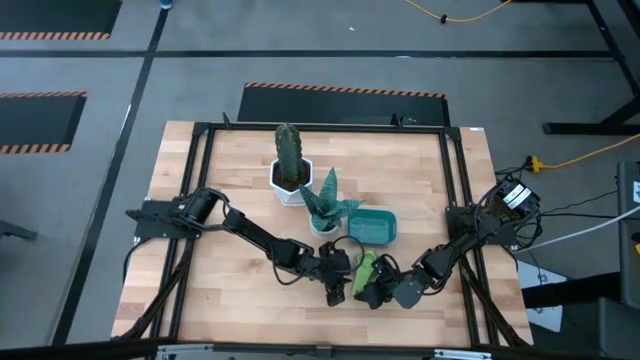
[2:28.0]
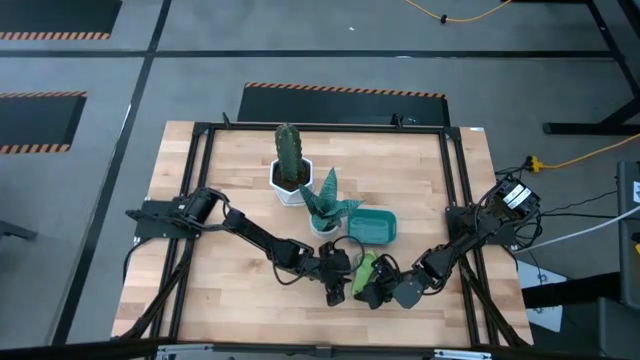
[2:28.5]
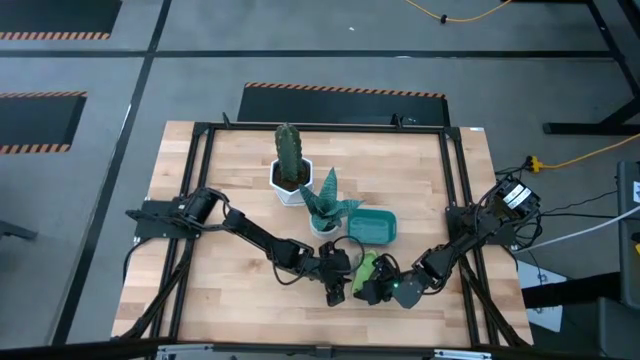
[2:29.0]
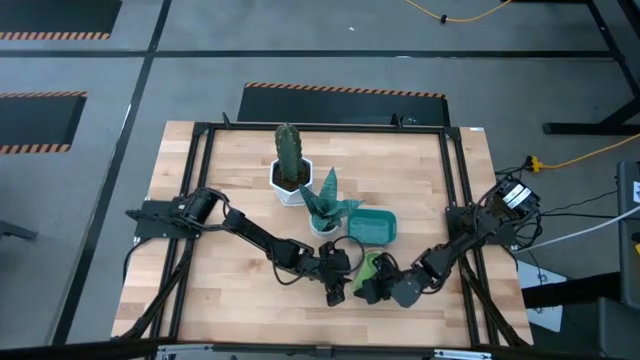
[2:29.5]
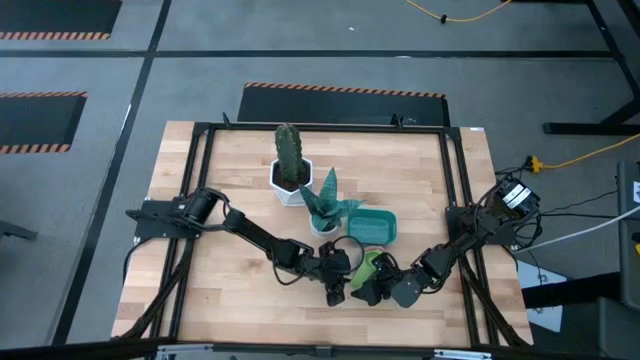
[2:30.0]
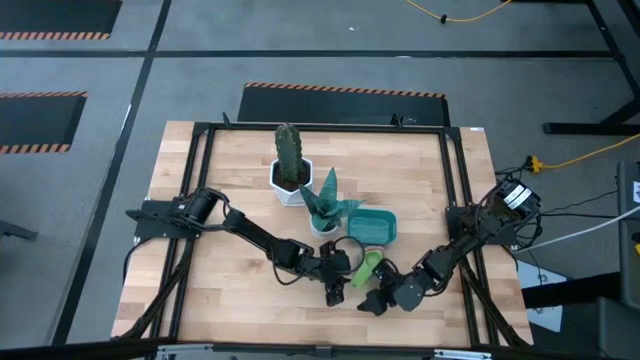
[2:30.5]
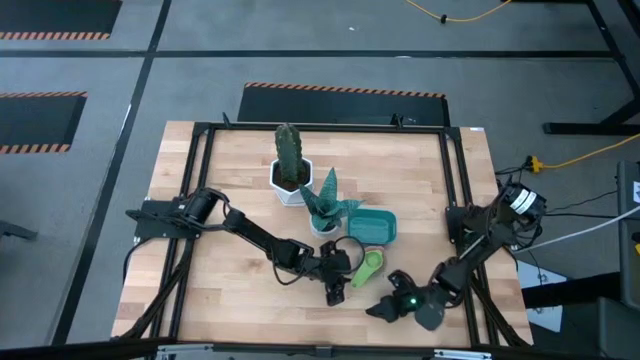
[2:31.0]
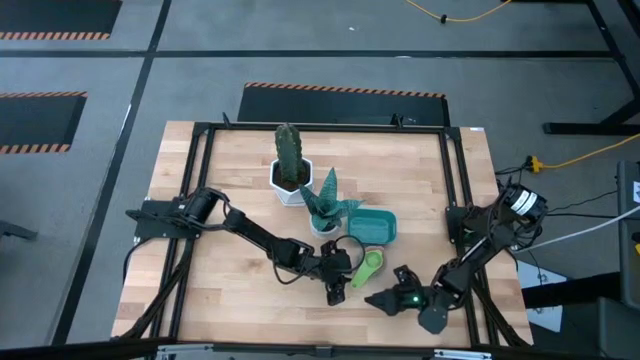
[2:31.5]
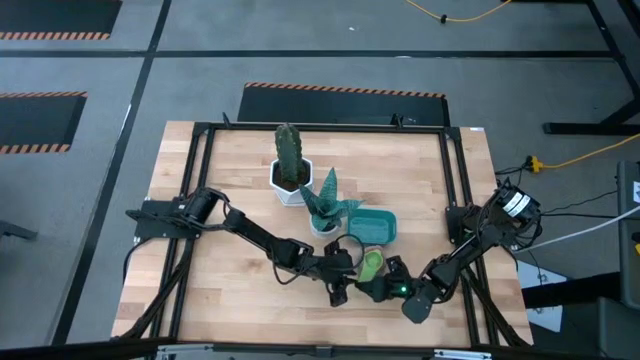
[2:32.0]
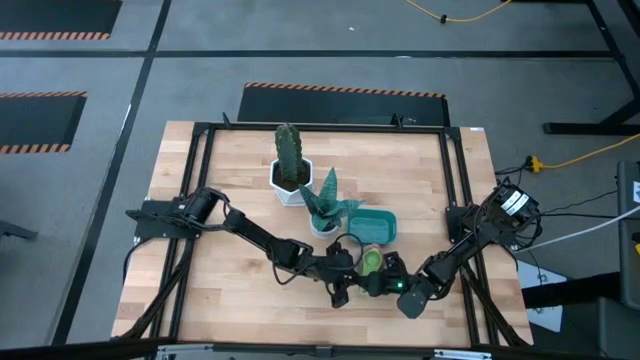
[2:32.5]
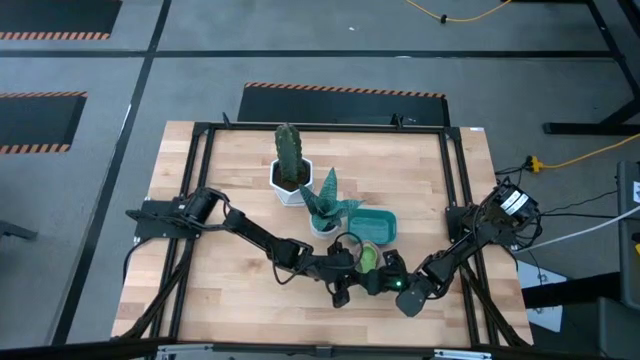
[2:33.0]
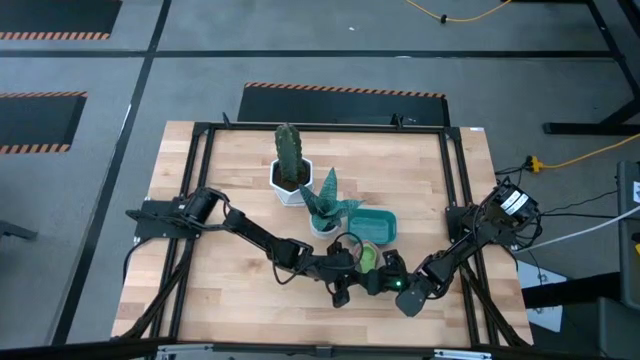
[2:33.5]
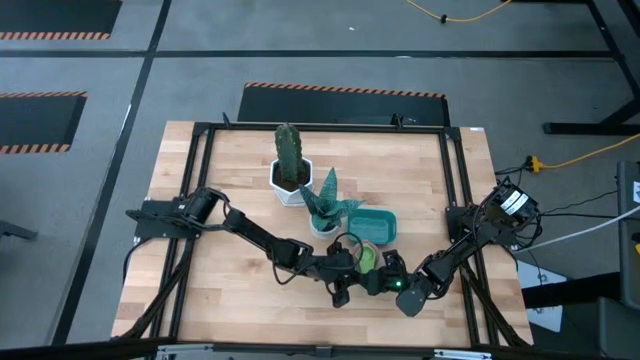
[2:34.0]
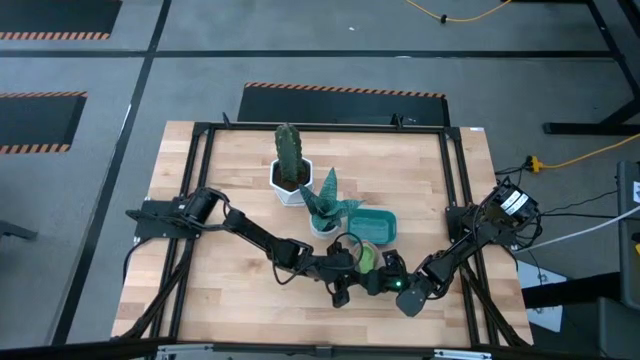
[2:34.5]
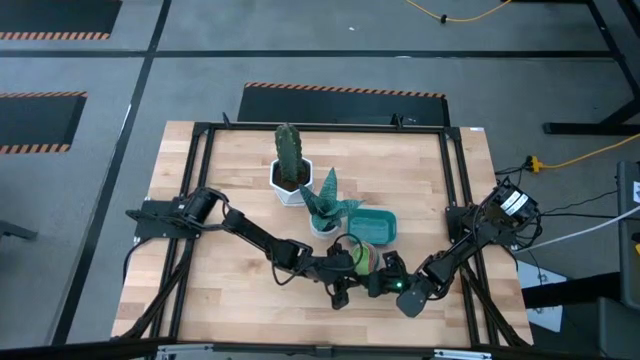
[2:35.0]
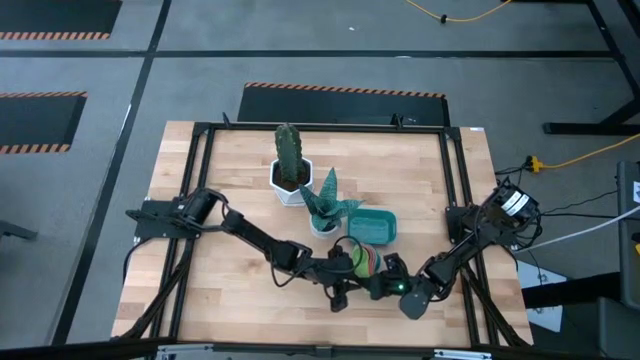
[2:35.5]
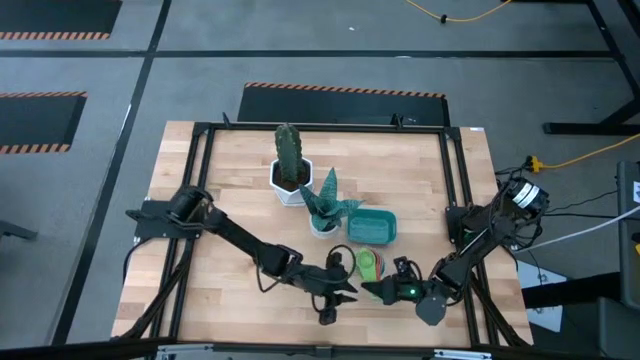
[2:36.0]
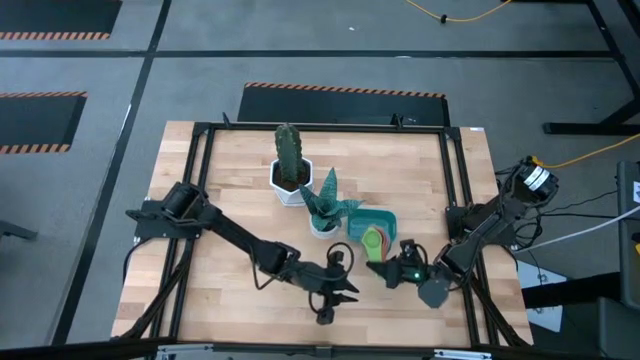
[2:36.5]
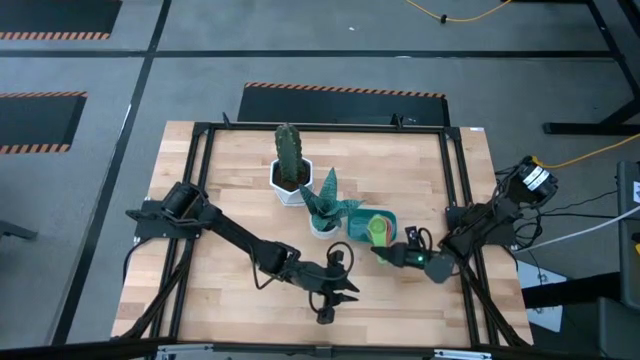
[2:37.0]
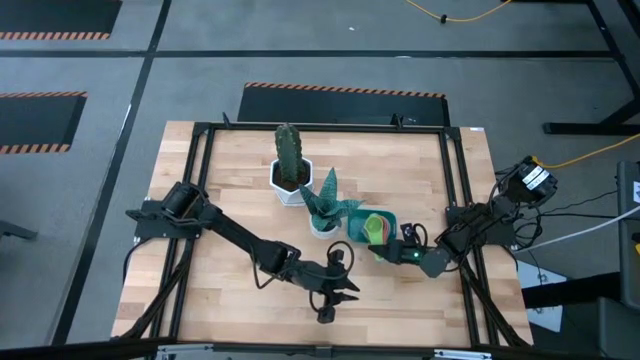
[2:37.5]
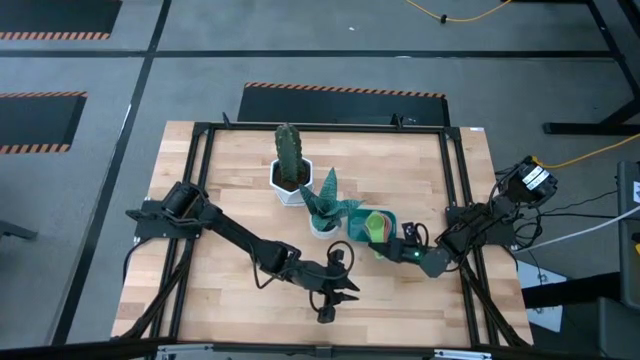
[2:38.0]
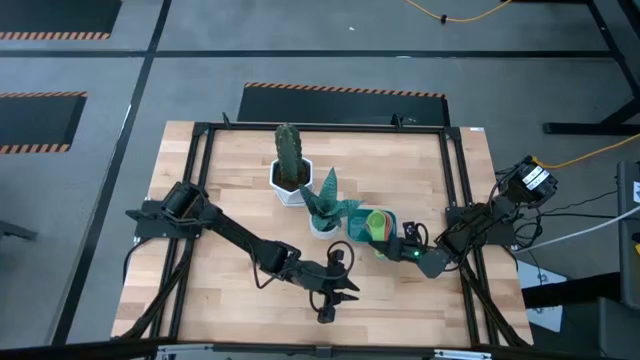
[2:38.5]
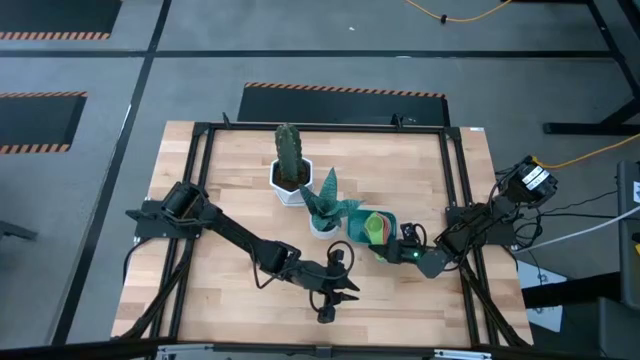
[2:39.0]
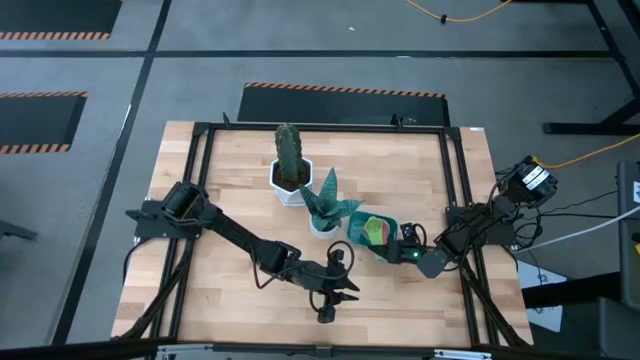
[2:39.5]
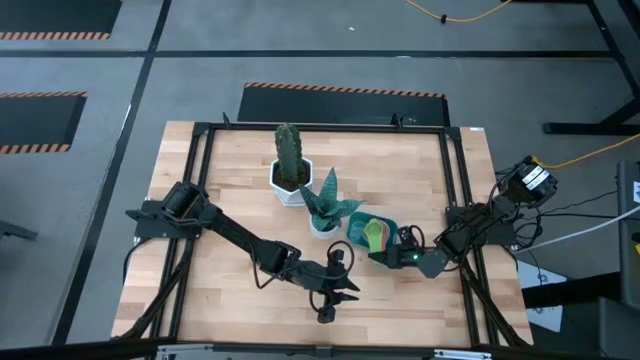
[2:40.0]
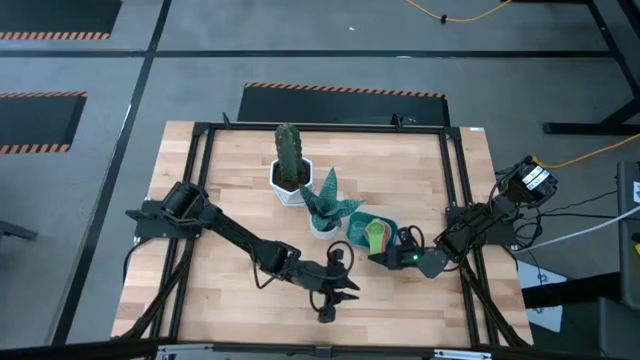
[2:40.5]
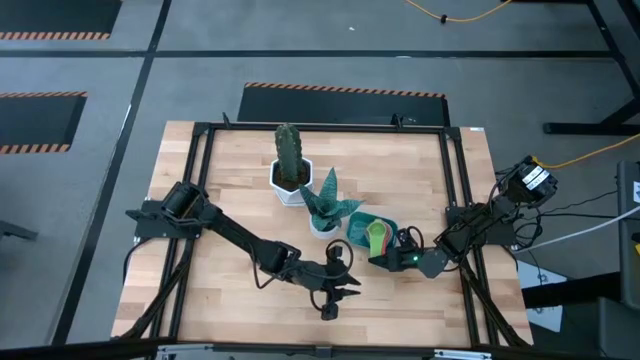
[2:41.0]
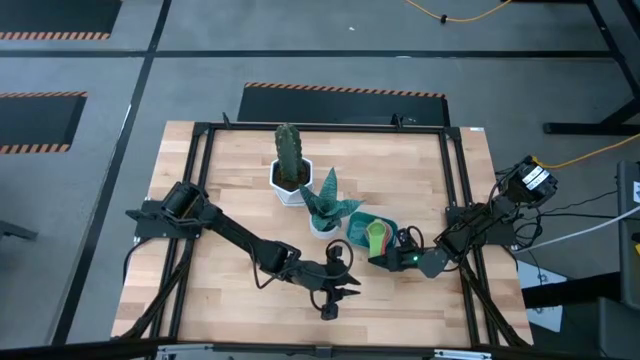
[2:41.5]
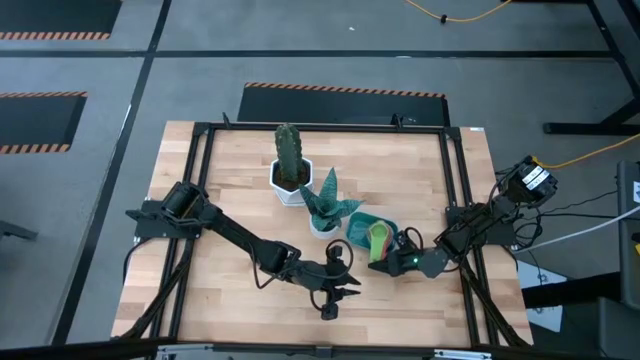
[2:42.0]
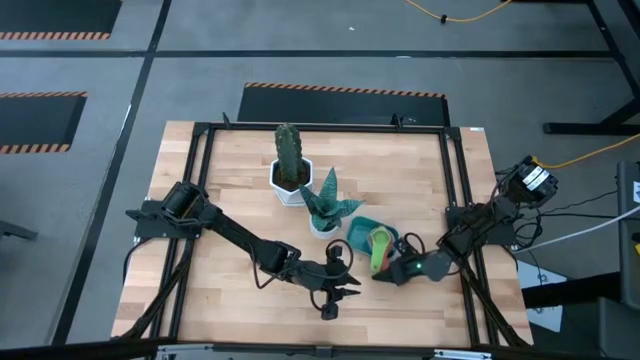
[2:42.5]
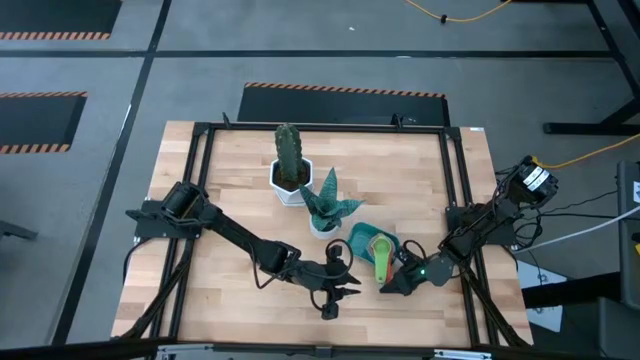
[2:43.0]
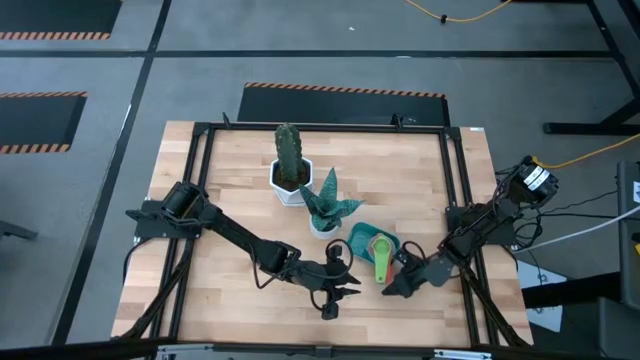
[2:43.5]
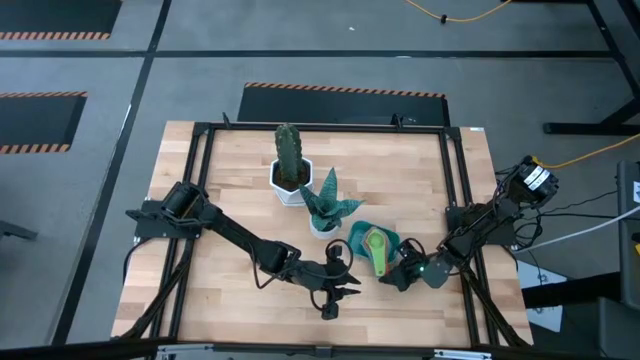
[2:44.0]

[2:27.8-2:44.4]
Task: Nest measuring cups in basket
Put the nested measuring cups into the green bin

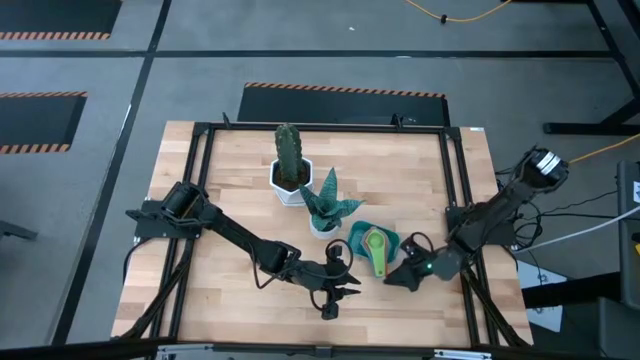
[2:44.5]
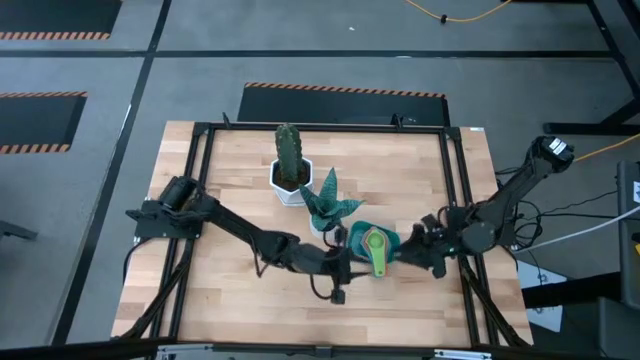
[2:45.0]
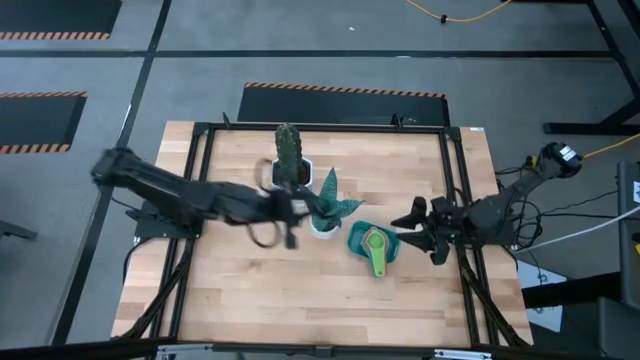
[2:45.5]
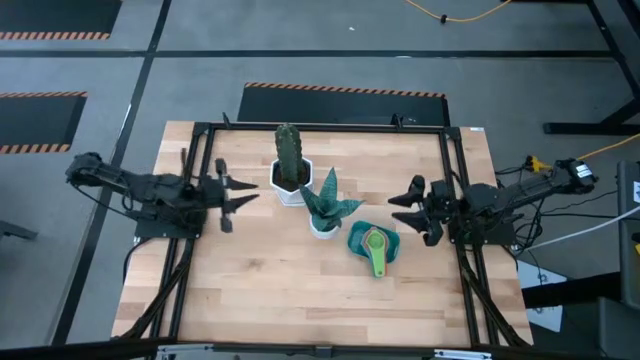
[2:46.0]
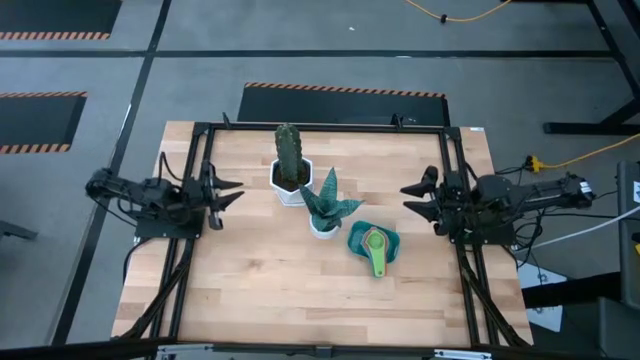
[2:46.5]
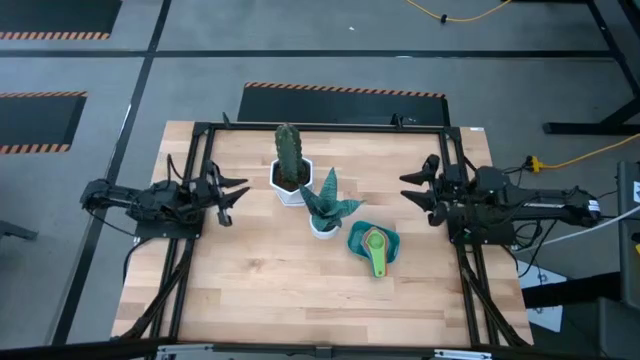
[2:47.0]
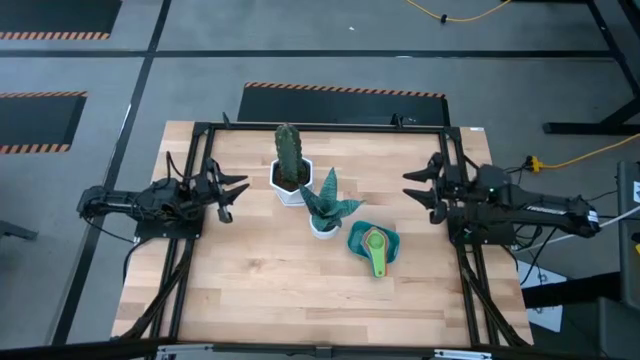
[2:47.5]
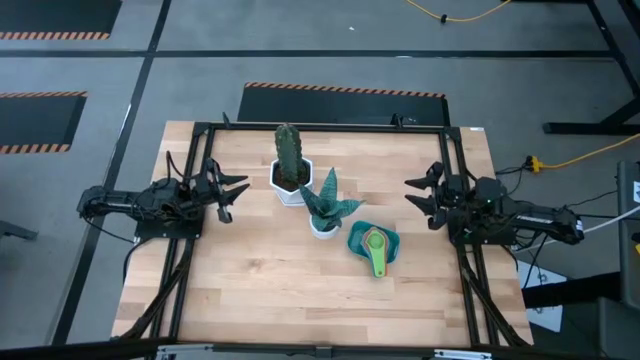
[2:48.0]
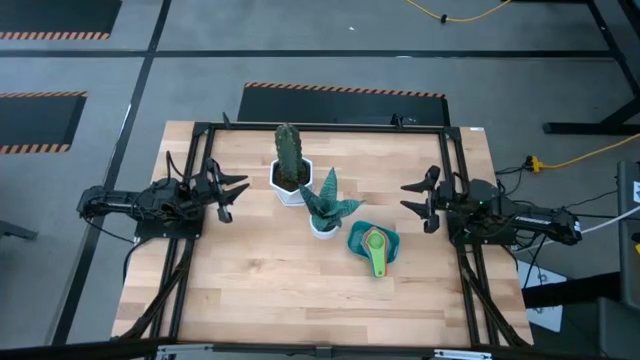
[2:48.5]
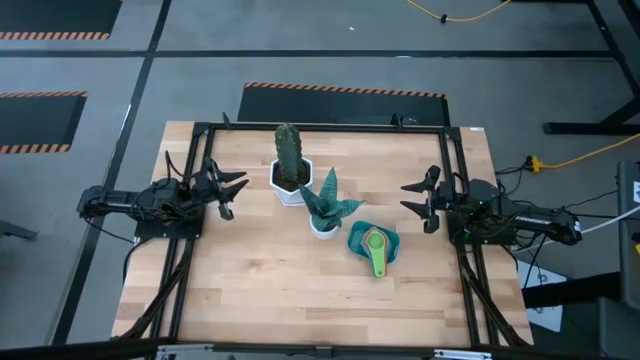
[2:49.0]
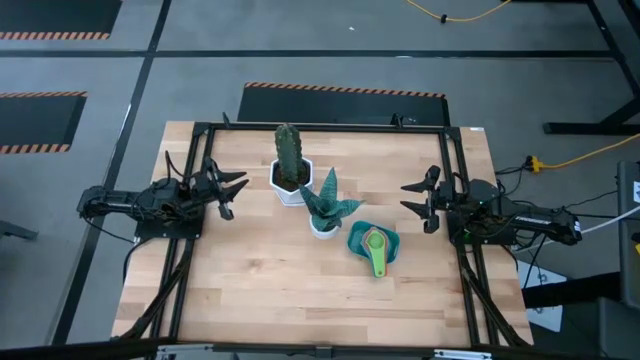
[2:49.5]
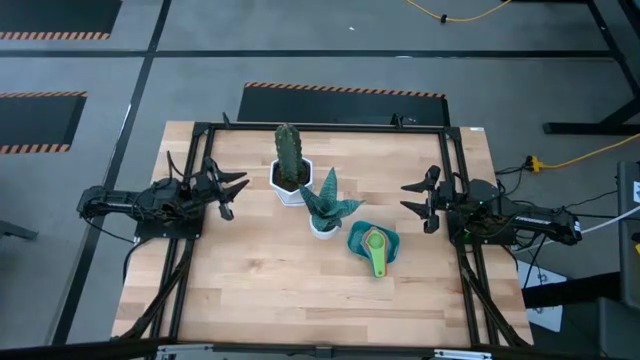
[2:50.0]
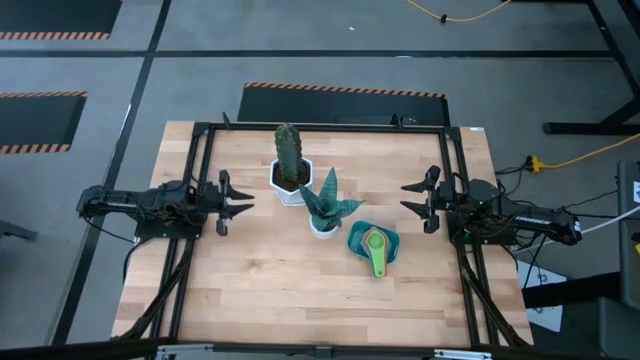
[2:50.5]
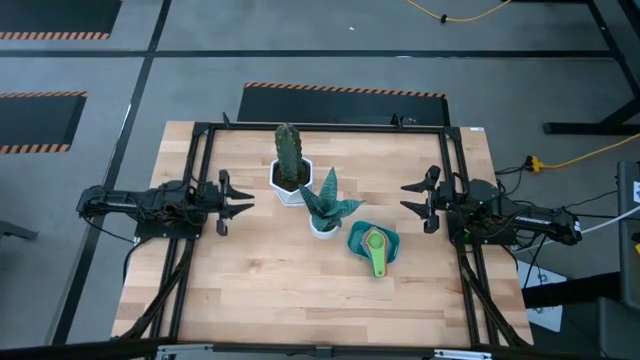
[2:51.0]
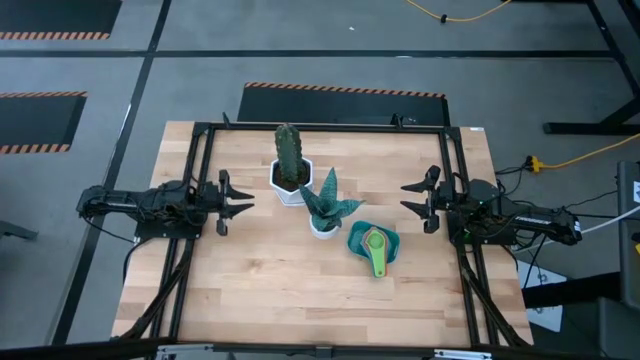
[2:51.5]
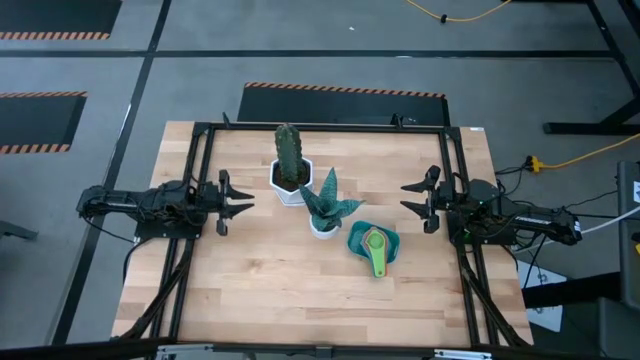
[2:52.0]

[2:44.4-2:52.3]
Return to Home Position
